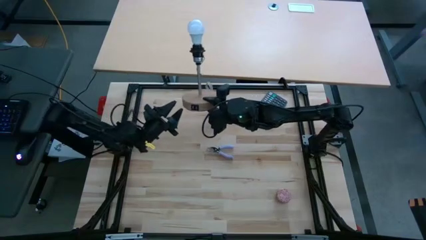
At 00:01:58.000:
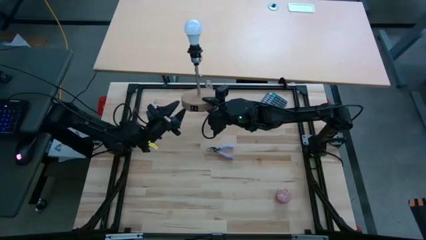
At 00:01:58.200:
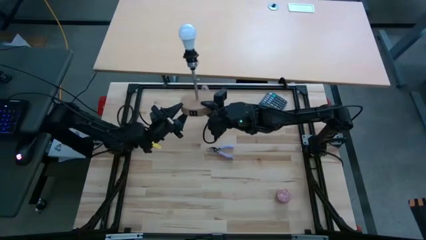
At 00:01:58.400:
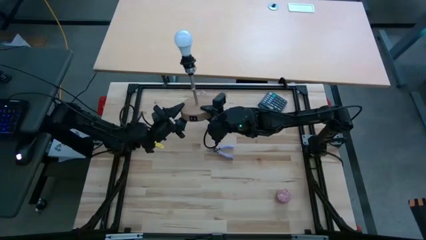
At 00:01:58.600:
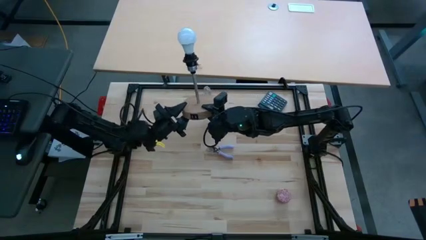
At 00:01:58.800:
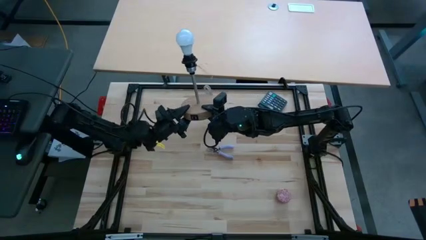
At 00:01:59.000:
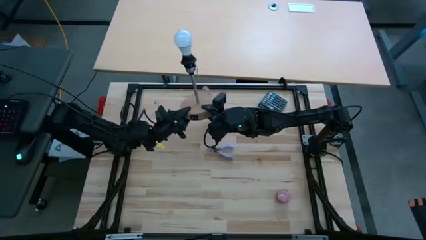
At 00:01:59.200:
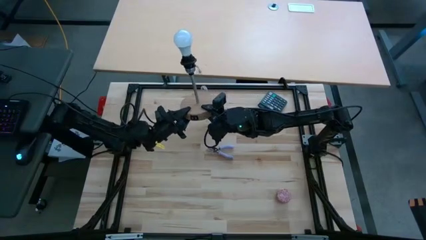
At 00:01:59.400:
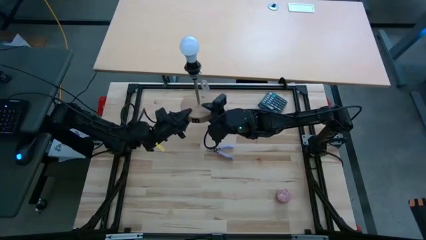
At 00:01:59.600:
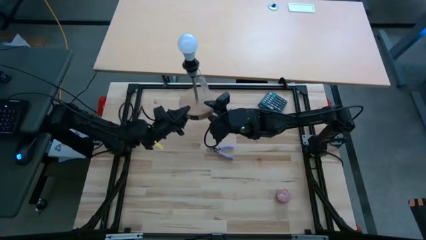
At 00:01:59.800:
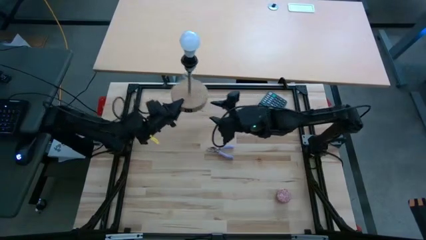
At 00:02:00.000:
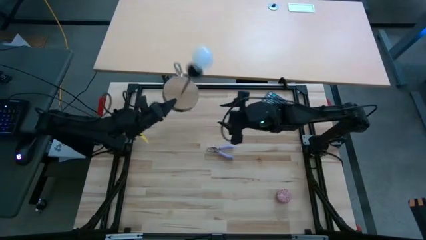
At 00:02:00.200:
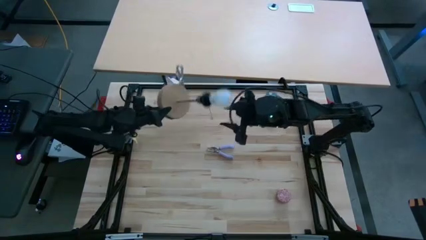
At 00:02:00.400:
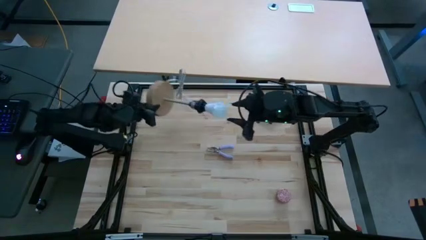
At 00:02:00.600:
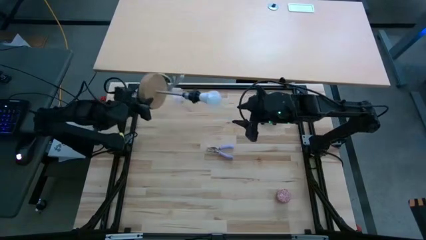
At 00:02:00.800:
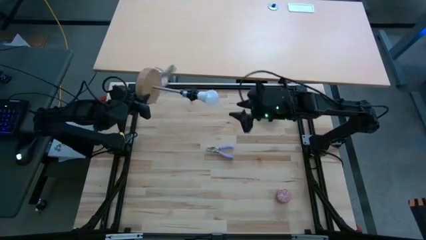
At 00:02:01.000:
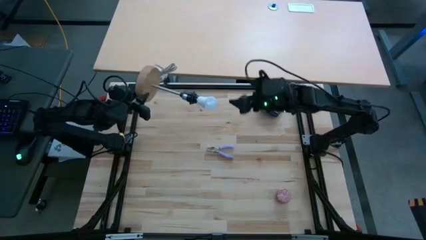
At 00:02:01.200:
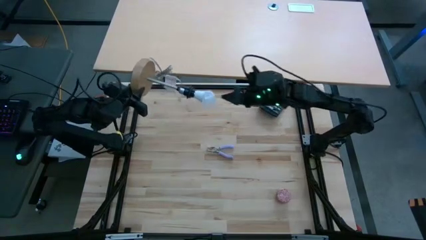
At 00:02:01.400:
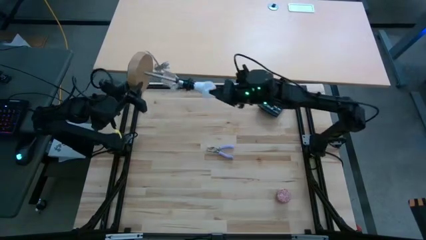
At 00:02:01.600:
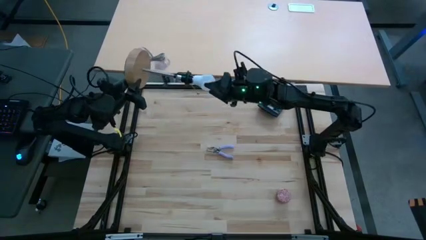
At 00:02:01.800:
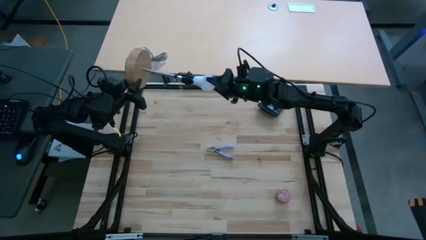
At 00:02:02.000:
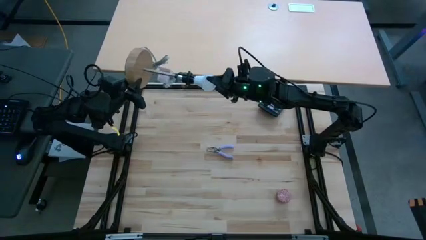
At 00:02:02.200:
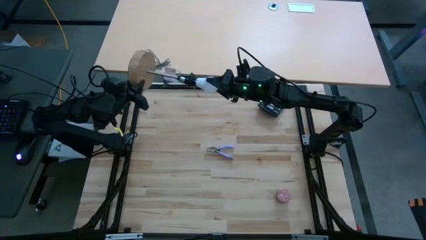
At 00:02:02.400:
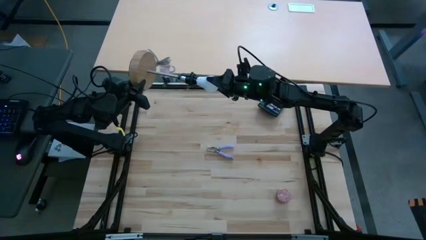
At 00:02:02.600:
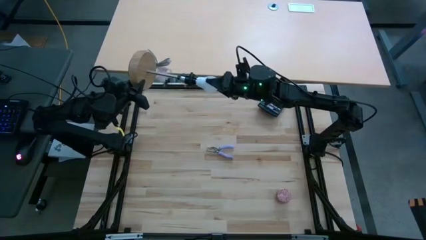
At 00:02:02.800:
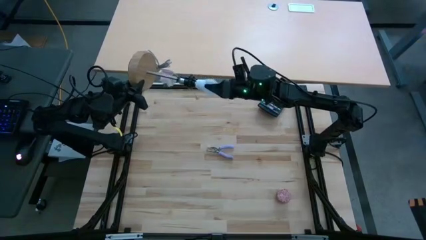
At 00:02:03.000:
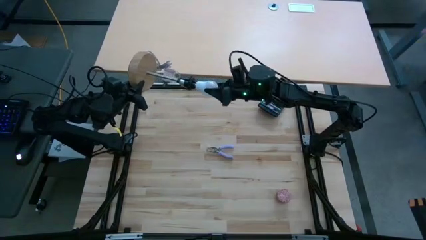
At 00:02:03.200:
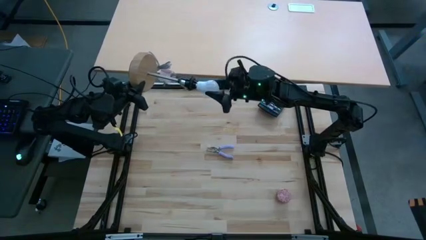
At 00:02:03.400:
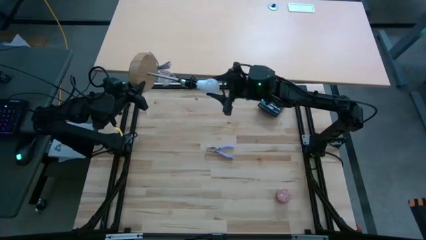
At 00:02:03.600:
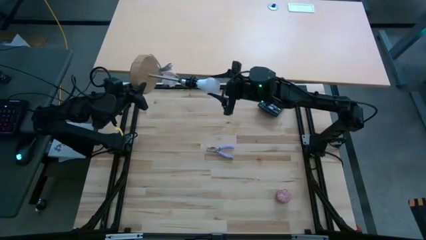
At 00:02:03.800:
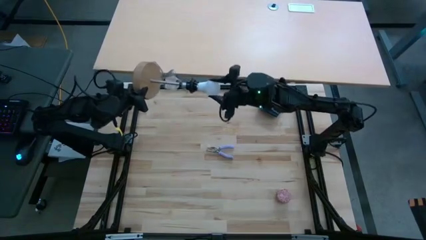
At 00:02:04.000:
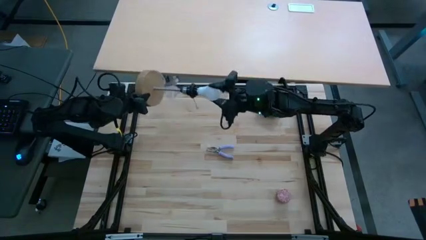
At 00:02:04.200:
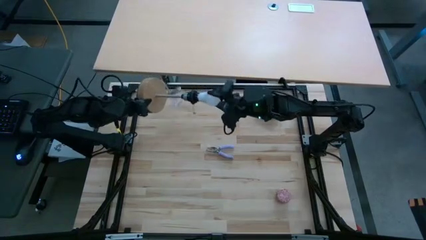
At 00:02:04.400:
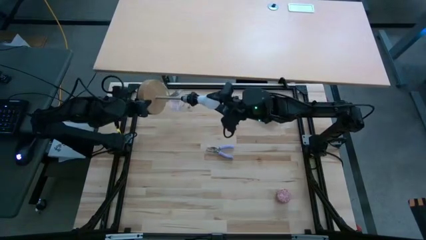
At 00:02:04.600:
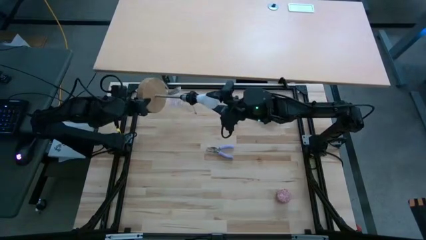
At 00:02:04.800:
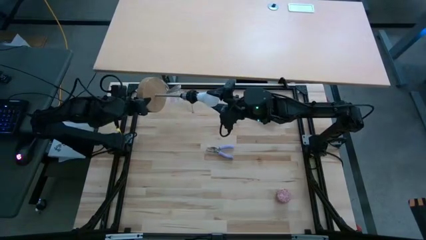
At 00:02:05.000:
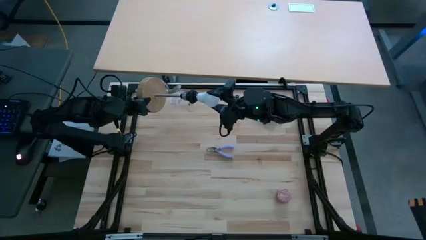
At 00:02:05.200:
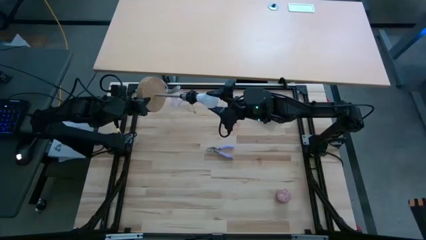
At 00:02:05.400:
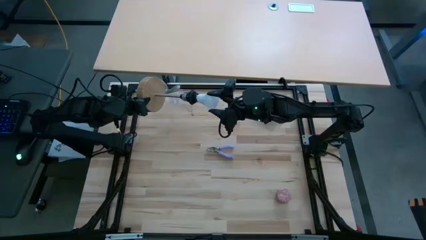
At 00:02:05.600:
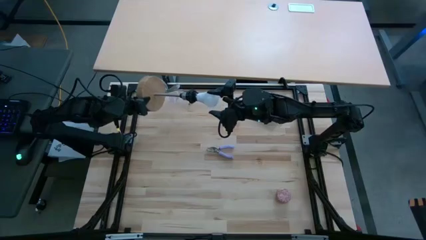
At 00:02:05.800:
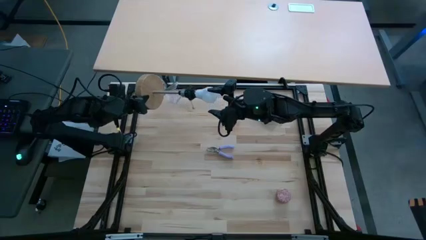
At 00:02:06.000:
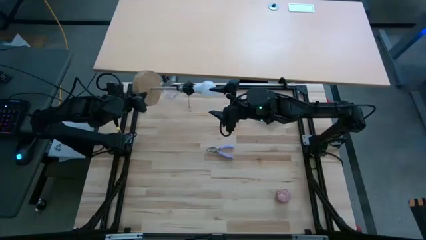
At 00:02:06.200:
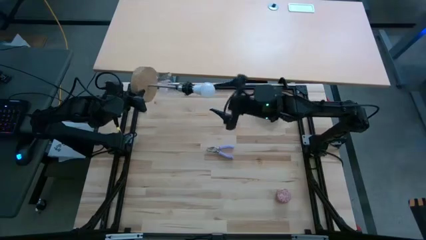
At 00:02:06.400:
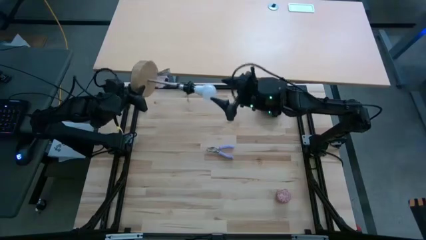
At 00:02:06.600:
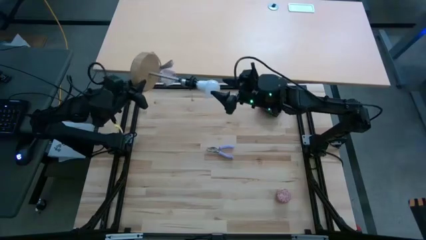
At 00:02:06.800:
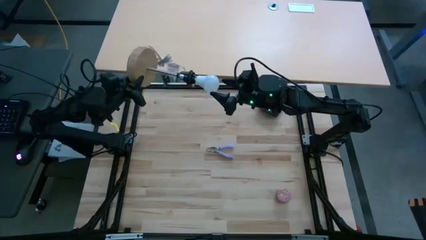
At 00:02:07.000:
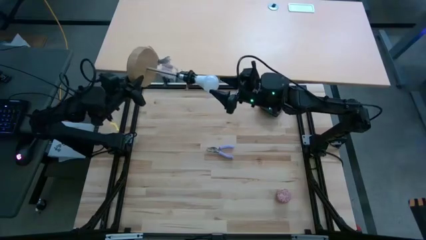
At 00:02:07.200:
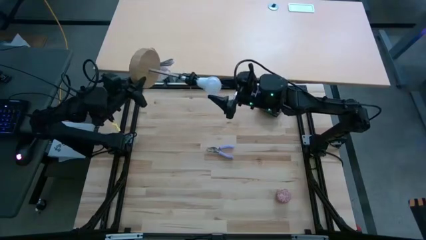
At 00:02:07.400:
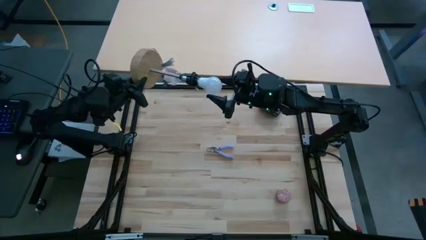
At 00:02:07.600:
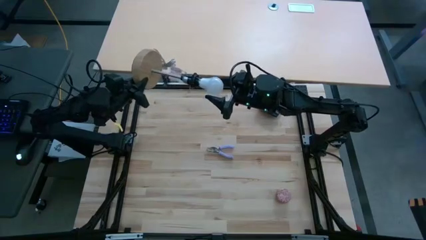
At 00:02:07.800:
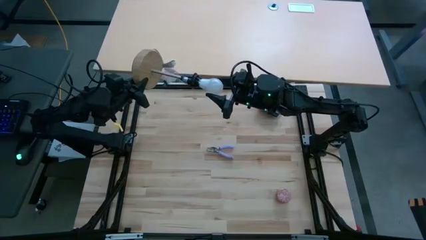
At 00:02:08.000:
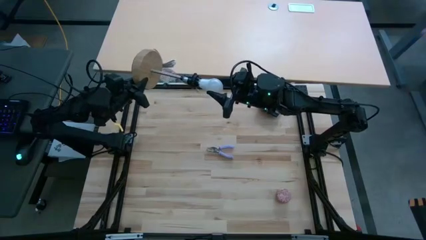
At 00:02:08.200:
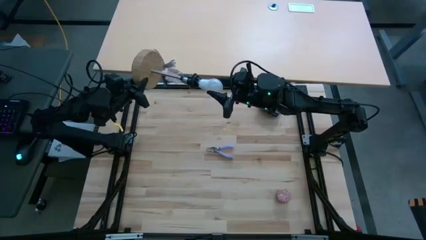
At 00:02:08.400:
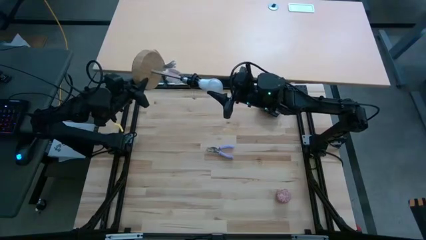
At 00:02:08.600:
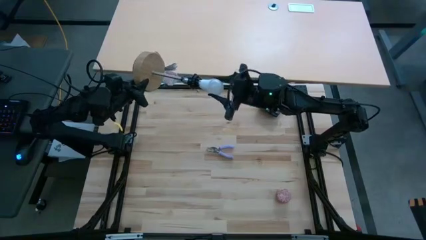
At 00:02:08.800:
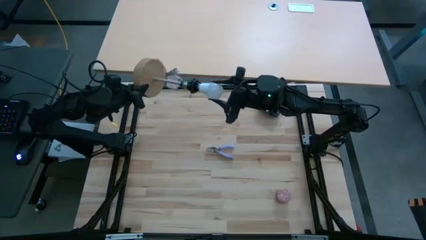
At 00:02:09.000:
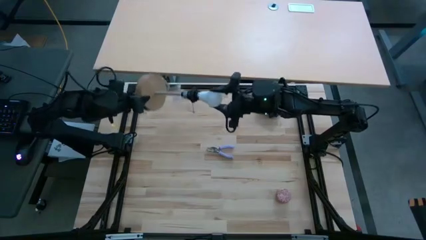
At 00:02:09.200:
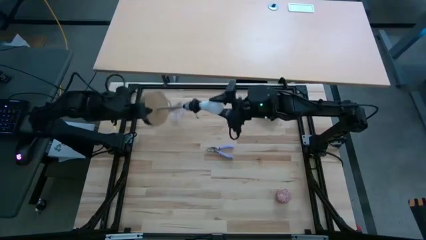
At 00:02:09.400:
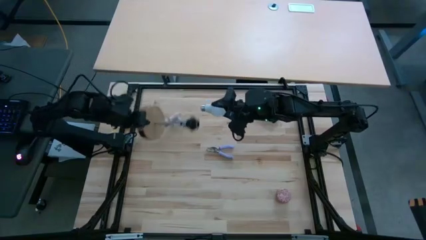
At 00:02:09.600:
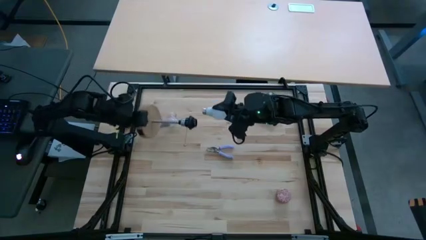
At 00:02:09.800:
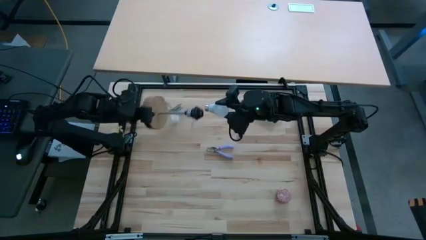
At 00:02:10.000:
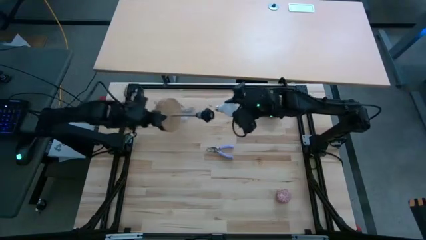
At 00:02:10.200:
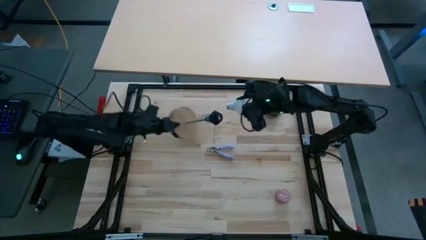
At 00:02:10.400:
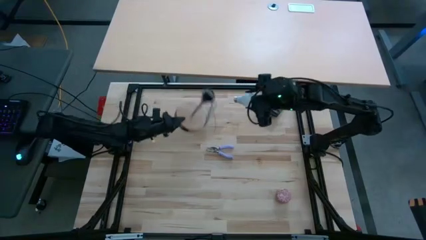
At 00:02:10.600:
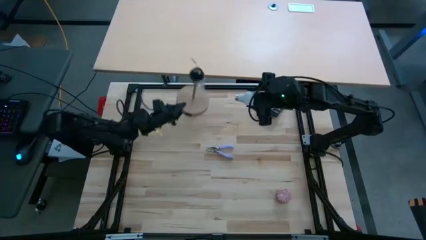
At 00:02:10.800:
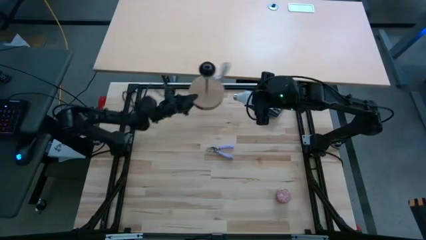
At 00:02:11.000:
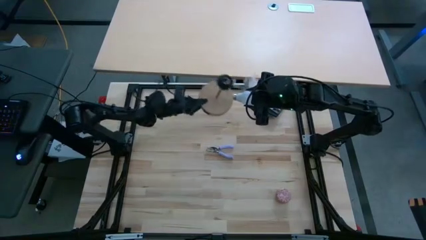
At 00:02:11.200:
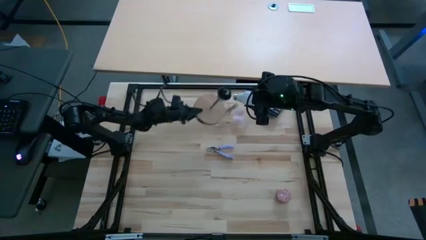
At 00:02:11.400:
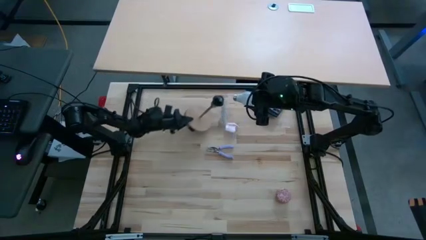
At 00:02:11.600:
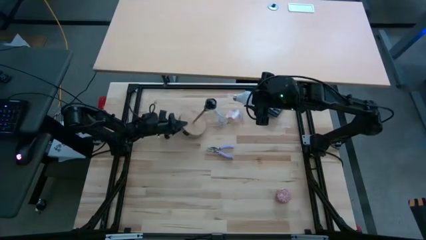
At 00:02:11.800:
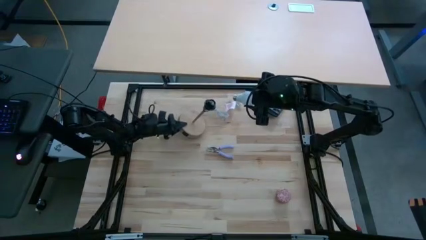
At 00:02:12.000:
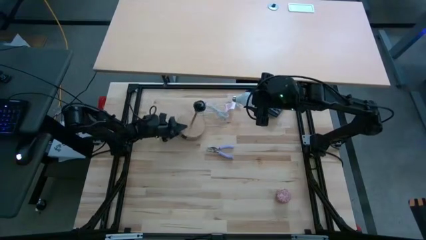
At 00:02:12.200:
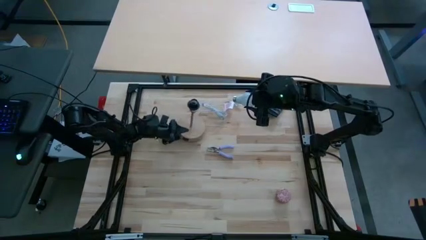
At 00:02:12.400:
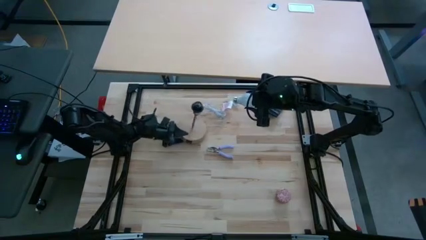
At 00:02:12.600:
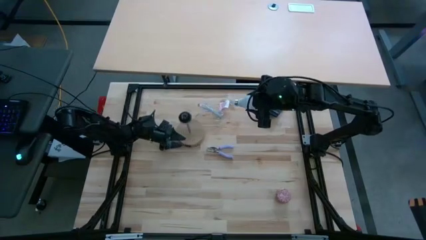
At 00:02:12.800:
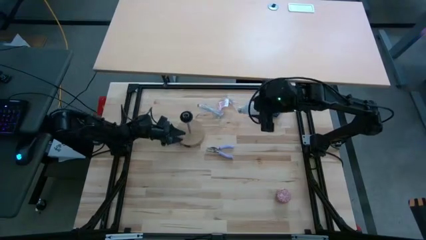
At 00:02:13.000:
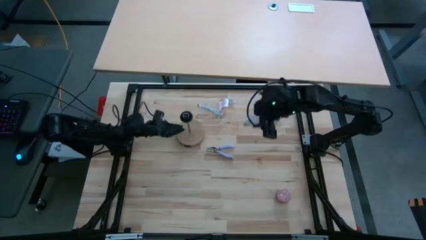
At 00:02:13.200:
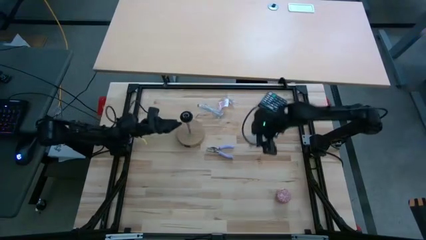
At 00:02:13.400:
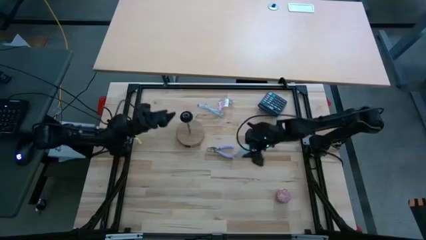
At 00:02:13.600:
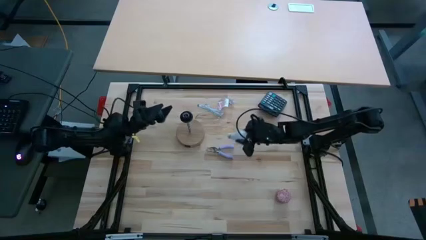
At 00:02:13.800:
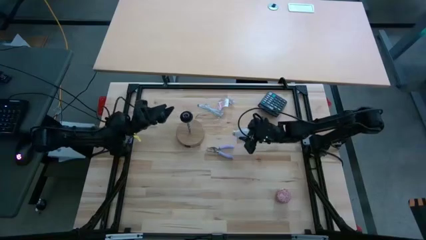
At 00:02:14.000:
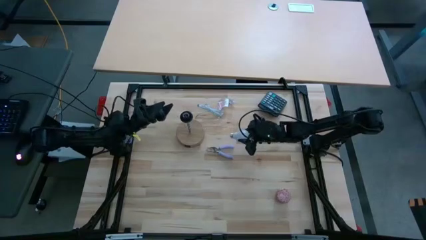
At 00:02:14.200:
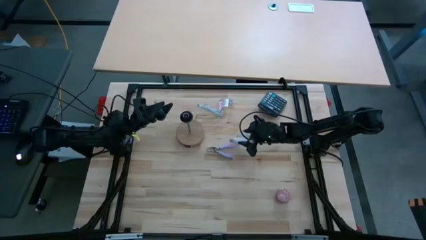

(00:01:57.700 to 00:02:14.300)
Task: Screw lightbulb
Remove the light bulb from the lamp socket
